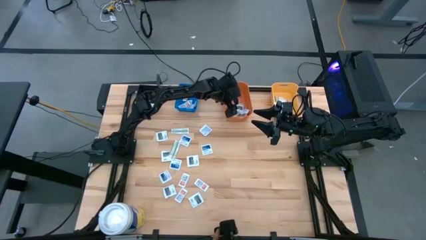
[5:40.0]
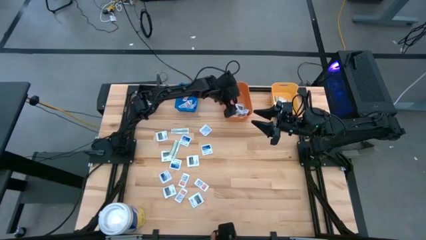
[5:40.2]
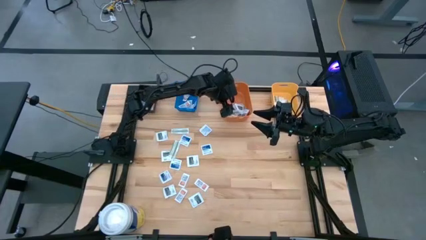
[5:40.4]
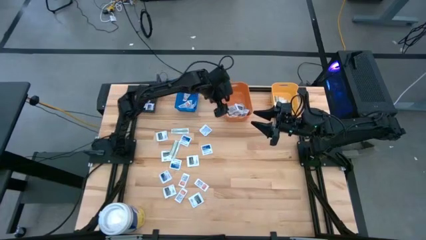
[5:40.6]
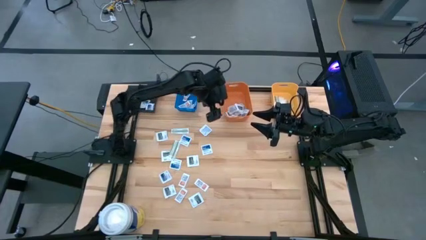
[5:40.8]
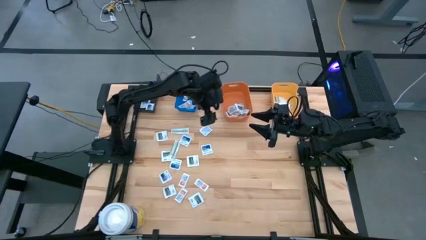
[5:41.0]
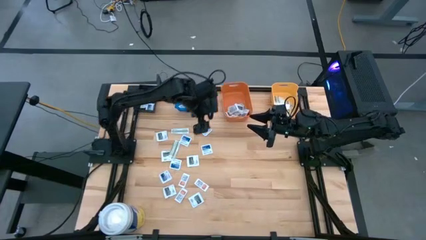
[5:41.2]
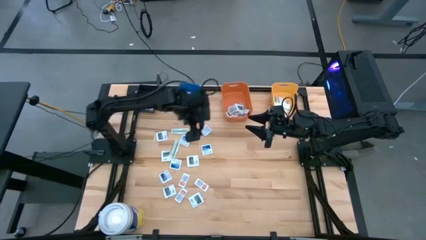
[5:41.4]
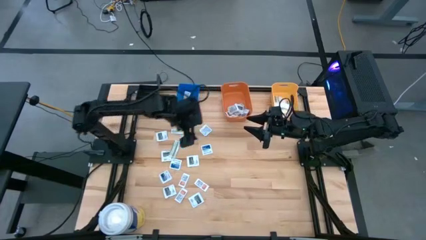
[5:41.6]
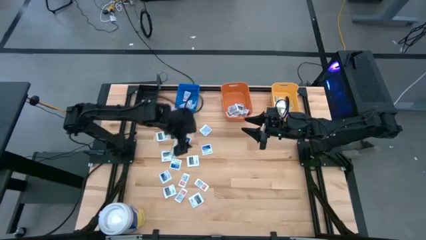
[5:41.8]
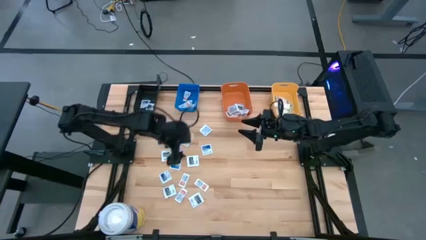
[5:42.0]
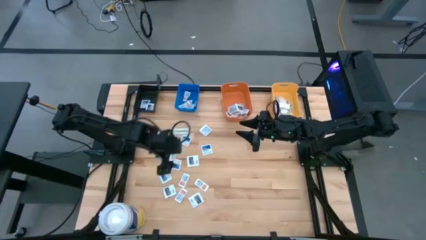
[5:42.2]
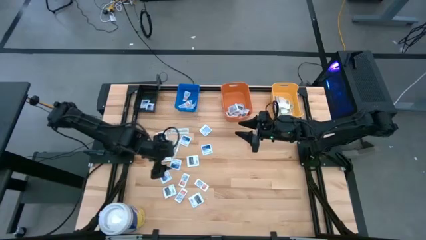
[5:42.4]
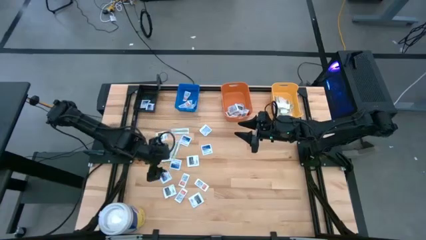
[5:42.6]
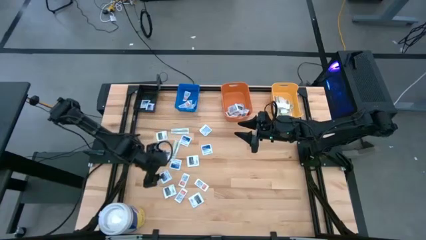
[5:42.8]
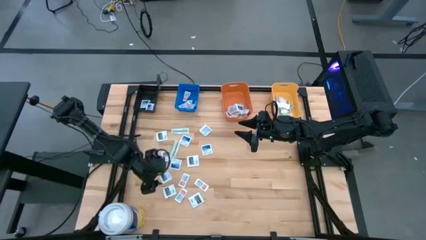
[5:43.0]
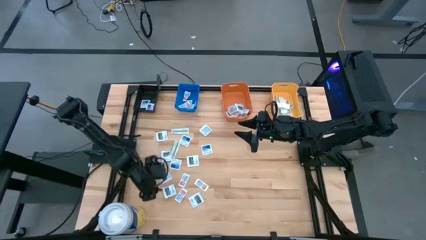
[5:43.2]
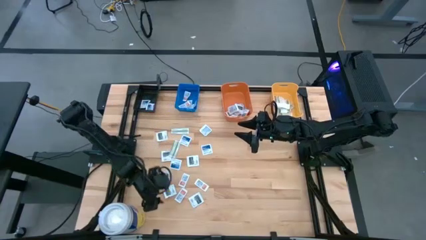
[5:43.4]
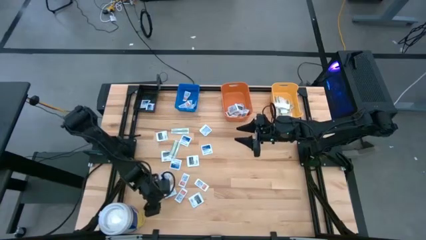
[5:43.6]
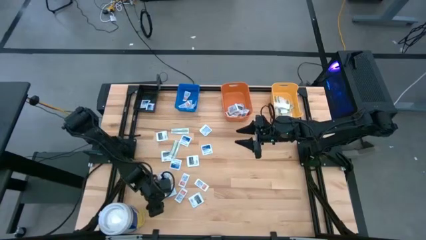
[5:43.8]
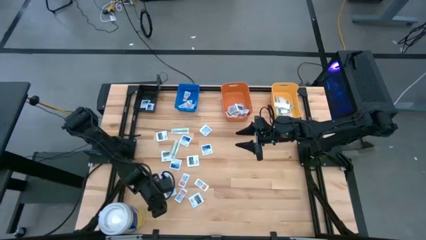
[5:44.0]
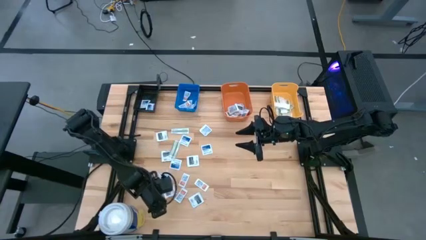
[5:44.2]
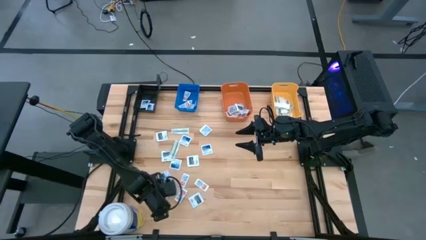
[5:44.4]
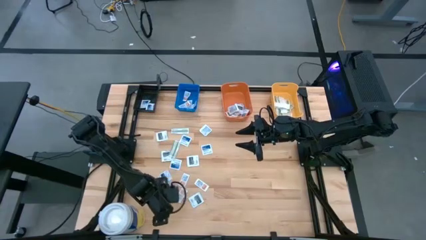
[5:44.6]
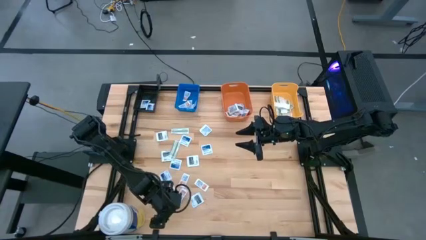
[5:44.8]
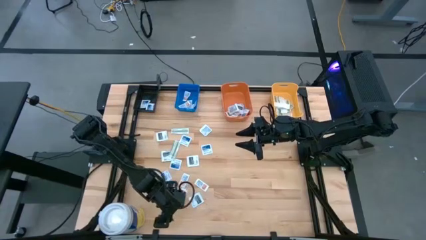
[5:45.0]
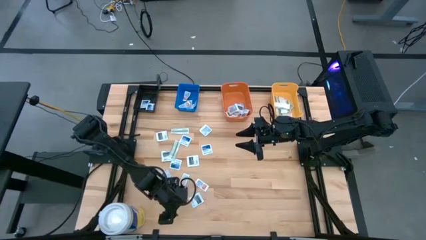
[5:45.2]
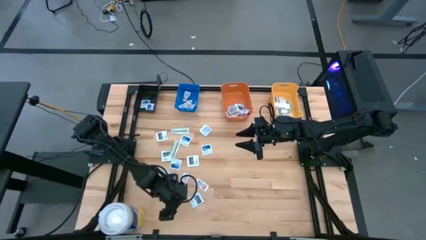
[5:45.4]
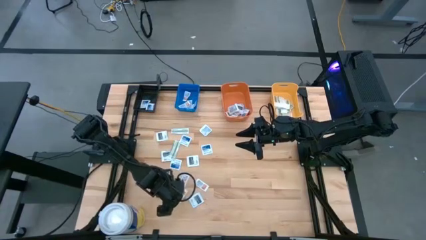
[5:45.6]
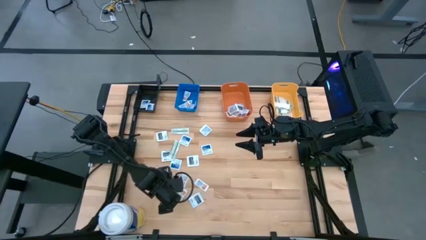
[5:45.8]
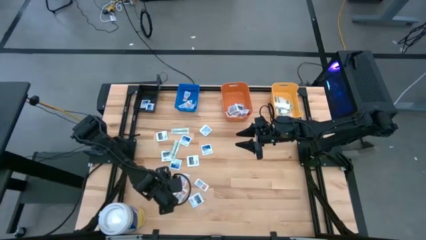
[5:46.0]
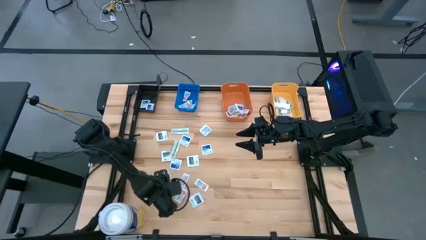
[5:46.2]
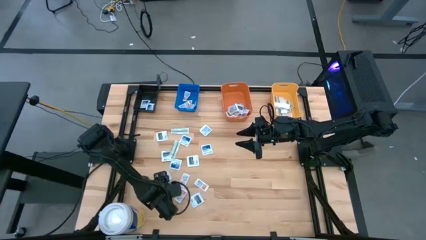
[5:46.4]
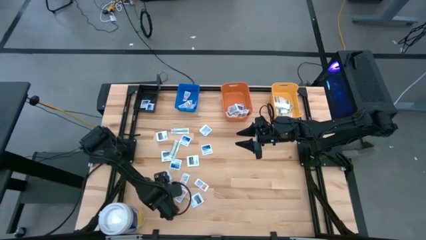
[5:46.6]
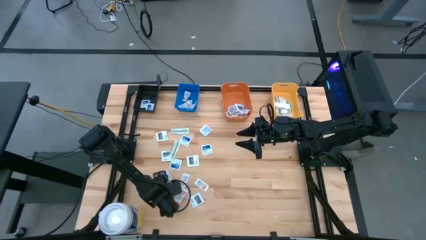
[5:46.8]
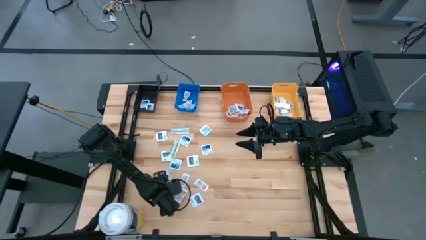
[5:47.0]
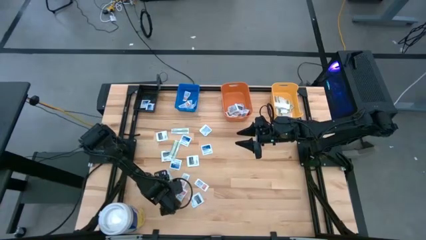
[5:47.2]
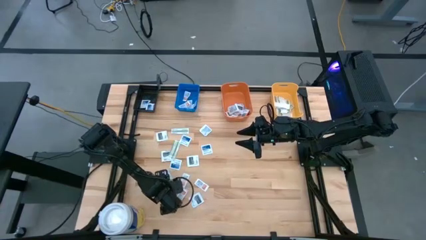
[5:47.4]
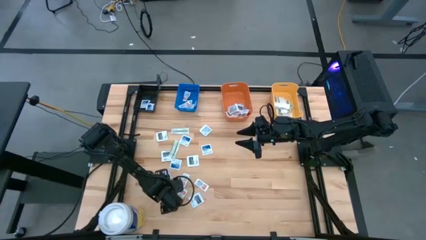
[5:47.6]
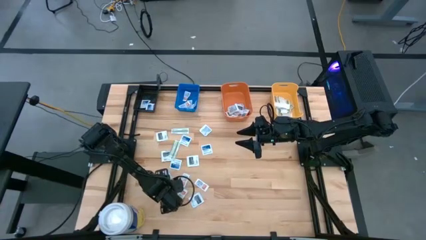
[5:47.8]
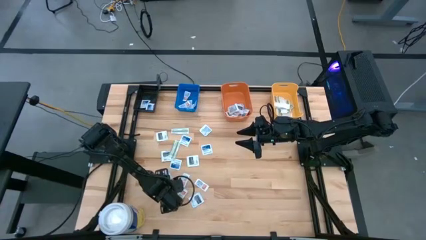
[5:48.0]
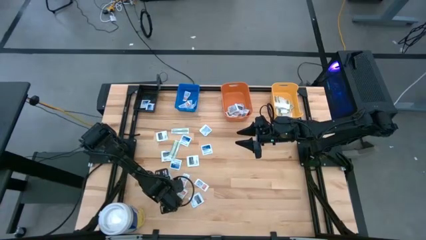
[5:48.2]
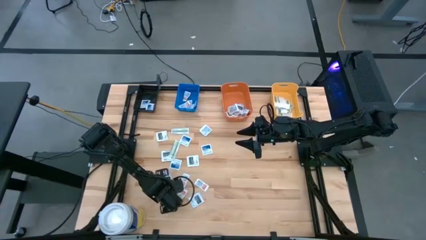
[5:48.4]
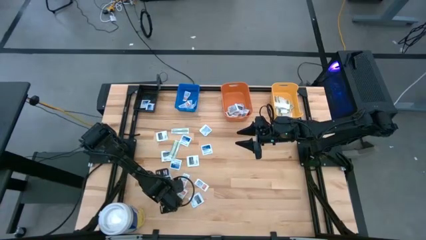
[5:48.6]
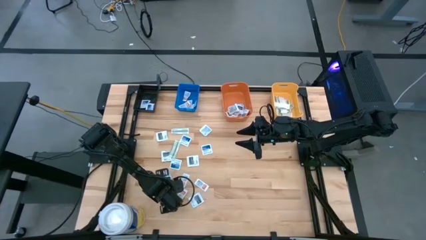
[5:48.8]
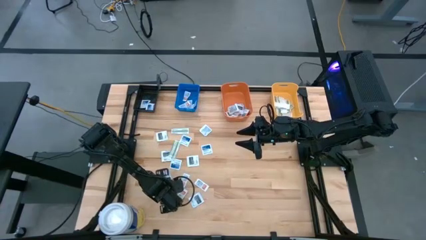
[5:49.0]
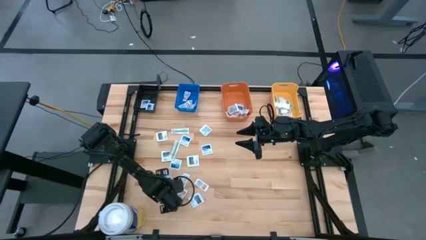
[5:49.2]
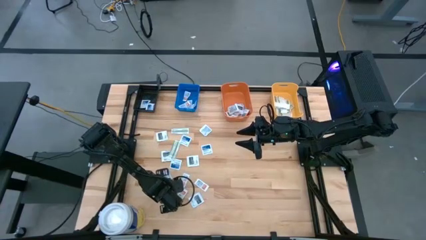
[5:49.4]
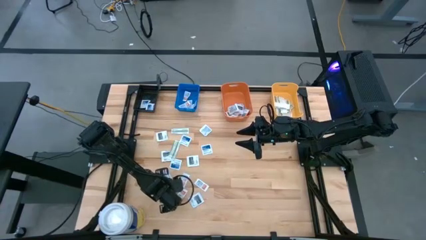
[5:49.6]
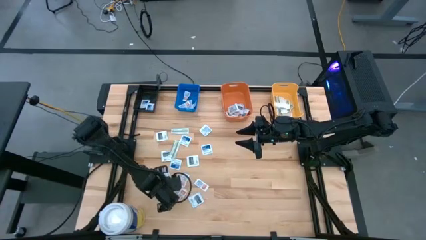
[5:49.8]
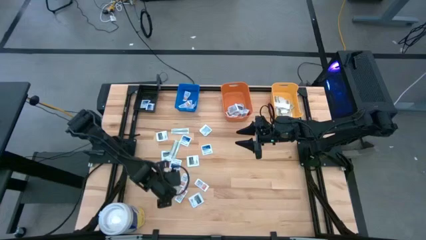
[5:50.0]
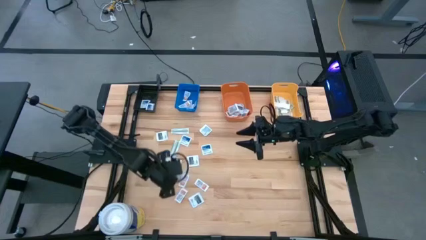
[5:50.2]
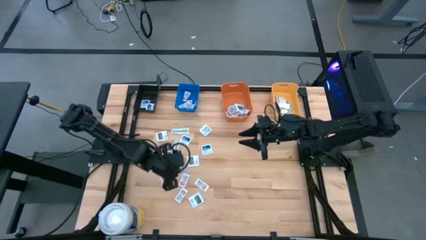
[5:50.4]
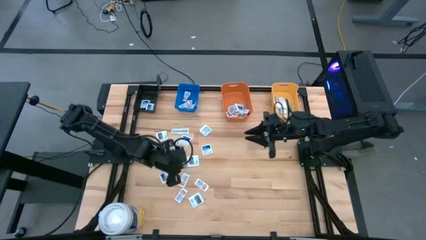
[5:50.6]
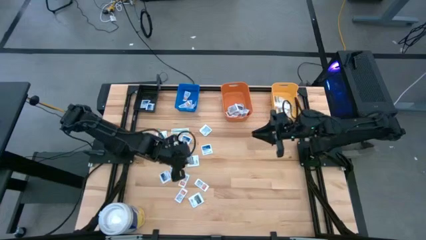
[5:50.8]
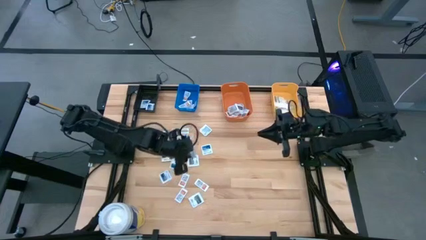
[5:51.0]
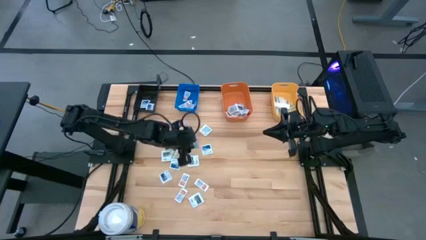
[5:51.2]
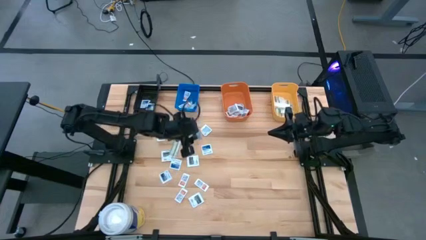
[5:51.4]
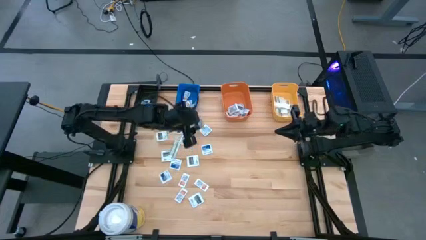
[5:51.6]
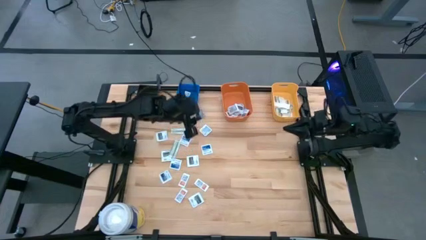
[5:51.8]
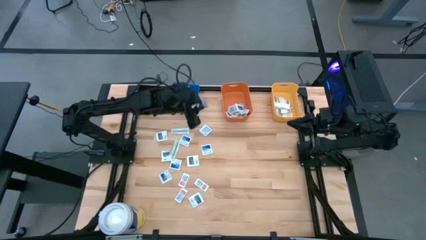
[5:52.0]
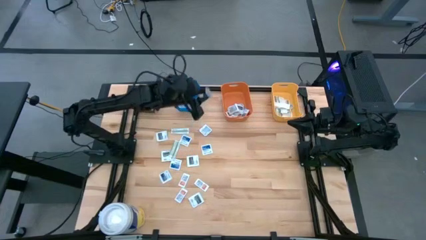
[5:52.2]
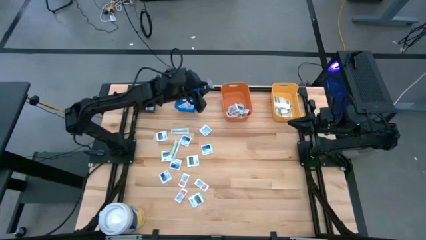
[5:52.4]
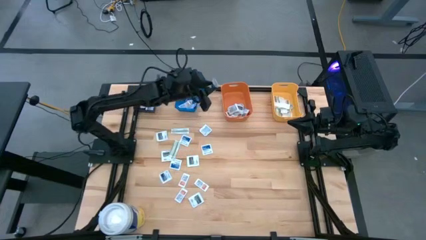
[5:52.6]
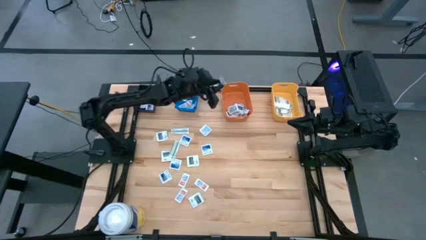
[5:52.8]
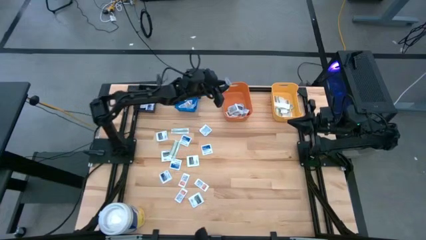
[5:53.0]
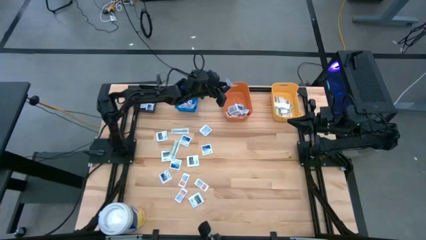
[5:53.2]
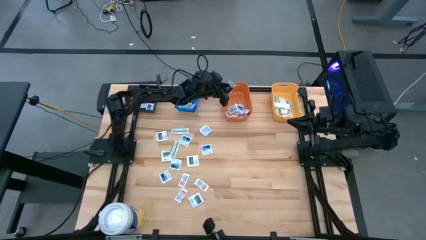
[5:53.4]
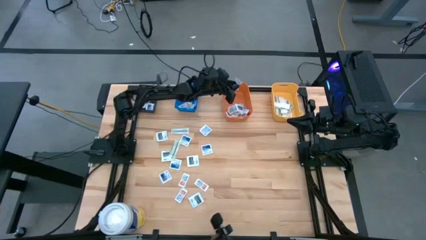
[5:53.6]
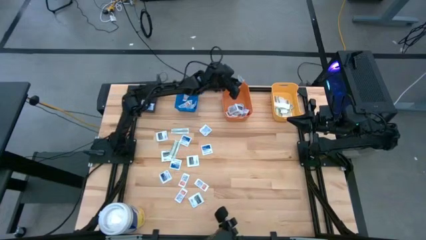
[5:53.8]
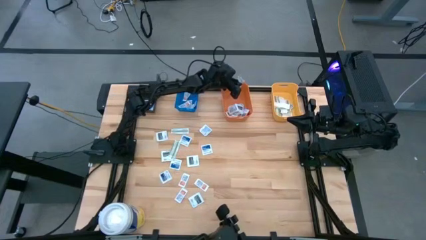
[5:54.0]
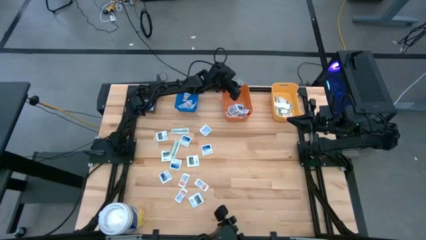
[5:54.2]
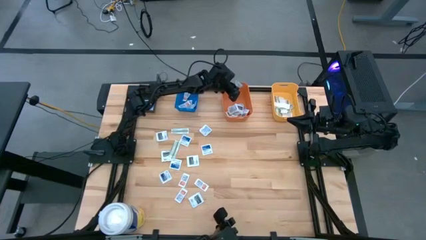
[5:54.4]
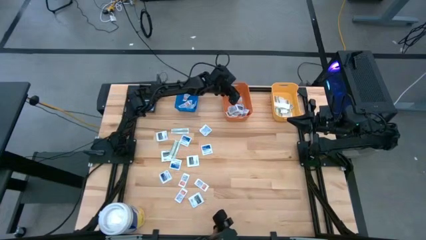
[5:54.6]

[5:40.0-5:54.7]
Task: Pick & Place First Aid Supplies
Put the towelette pack into the orange bin
